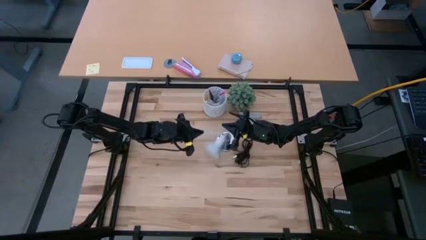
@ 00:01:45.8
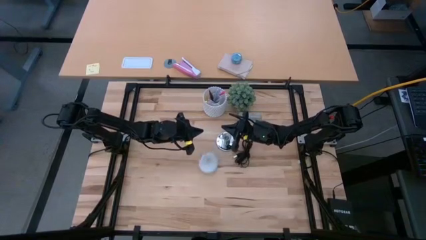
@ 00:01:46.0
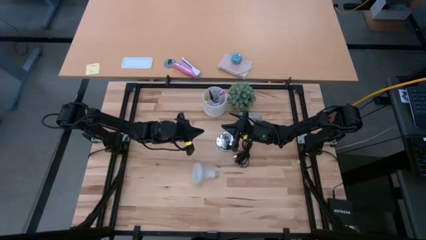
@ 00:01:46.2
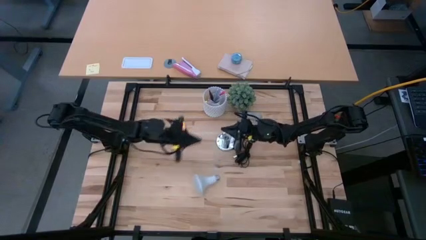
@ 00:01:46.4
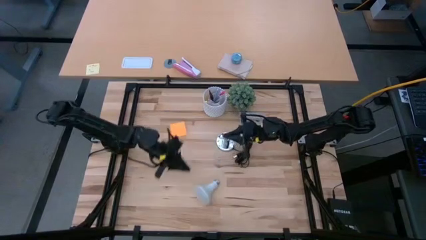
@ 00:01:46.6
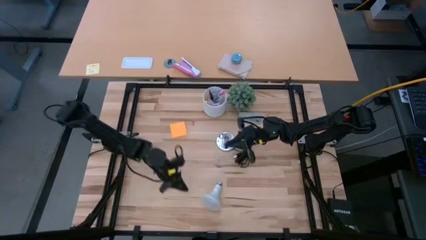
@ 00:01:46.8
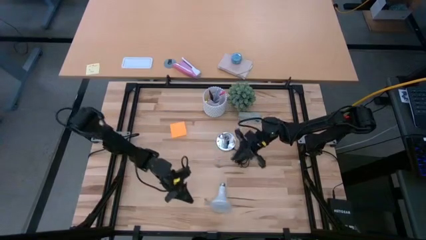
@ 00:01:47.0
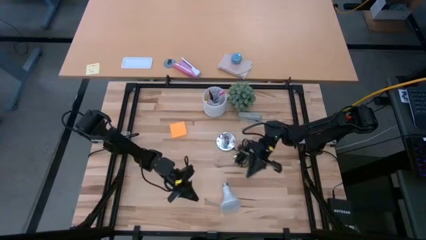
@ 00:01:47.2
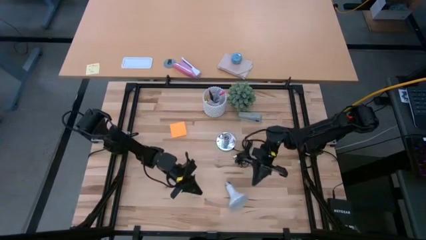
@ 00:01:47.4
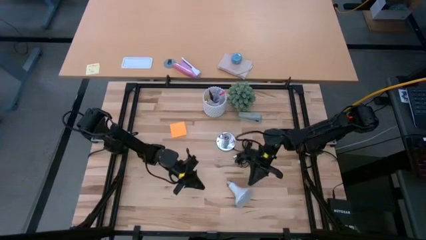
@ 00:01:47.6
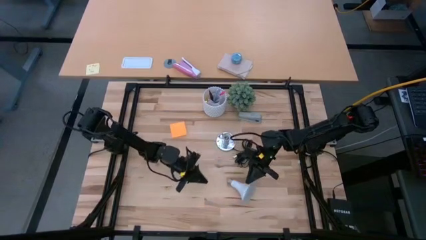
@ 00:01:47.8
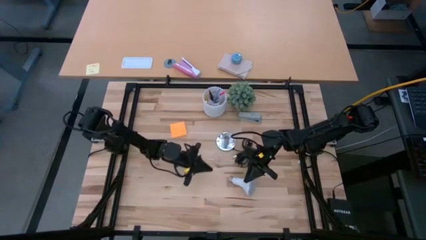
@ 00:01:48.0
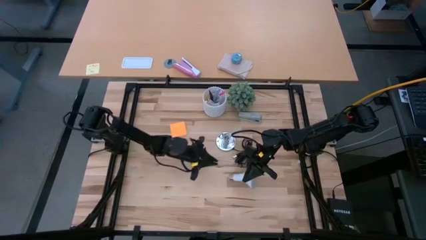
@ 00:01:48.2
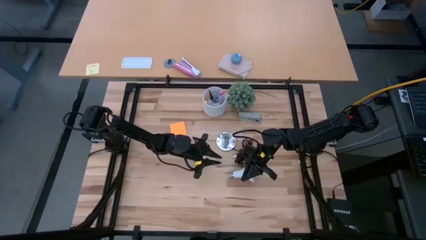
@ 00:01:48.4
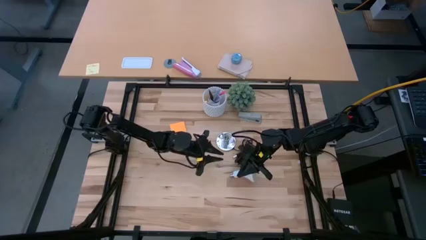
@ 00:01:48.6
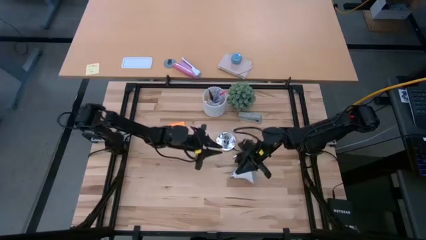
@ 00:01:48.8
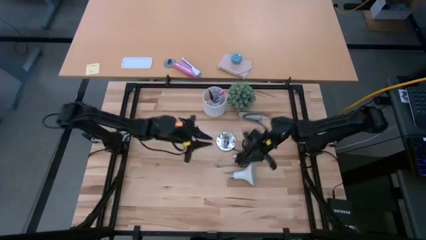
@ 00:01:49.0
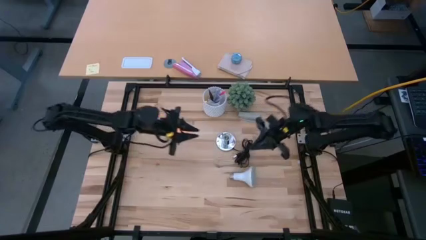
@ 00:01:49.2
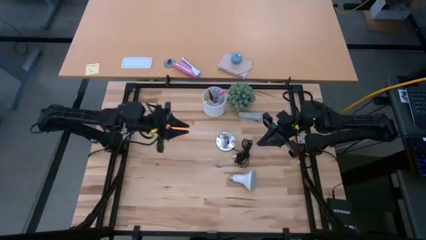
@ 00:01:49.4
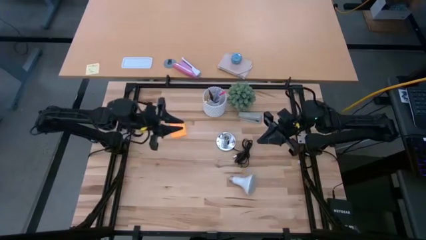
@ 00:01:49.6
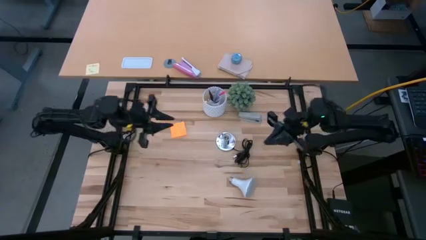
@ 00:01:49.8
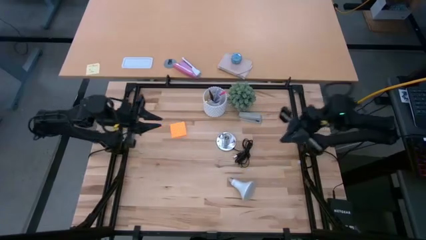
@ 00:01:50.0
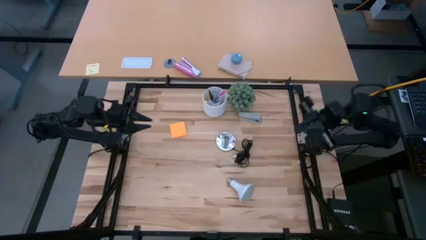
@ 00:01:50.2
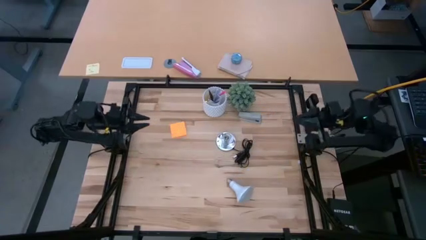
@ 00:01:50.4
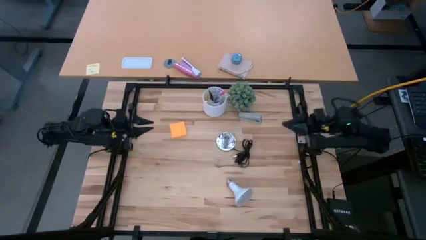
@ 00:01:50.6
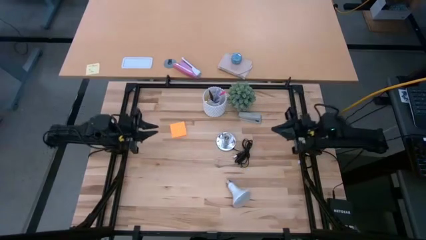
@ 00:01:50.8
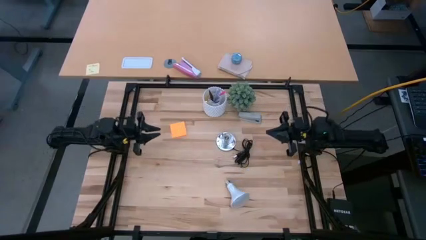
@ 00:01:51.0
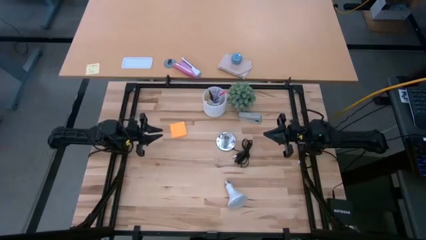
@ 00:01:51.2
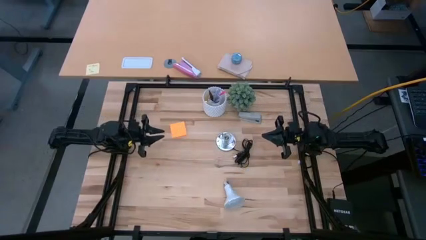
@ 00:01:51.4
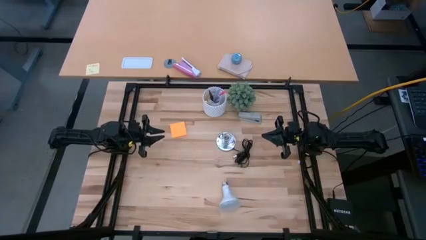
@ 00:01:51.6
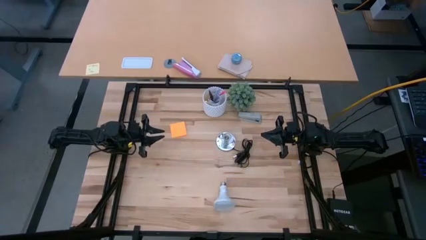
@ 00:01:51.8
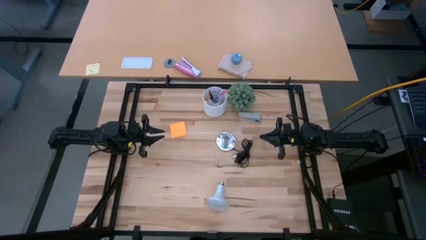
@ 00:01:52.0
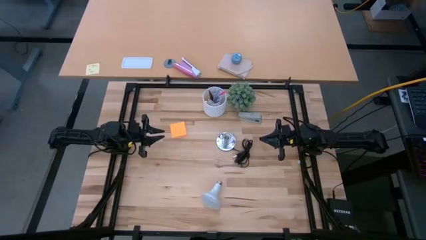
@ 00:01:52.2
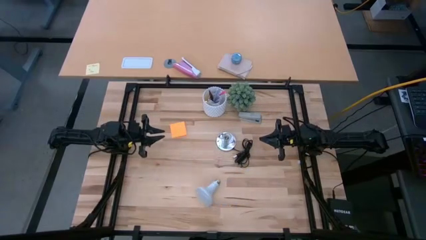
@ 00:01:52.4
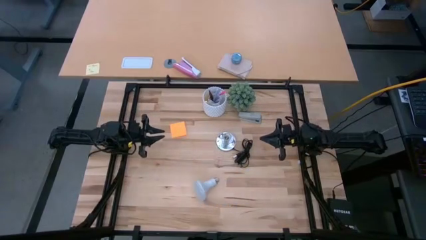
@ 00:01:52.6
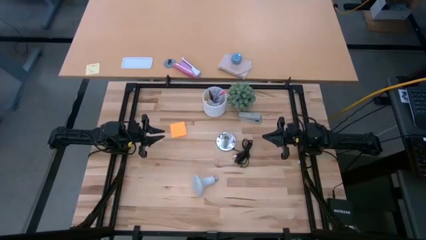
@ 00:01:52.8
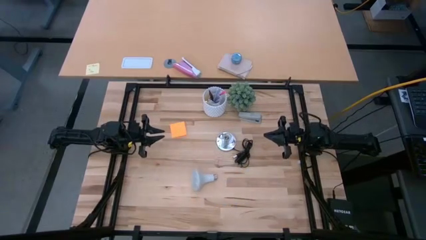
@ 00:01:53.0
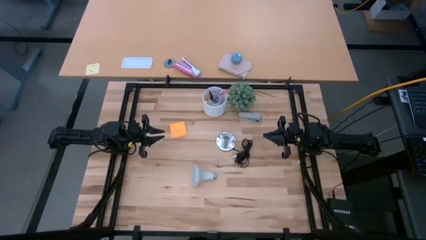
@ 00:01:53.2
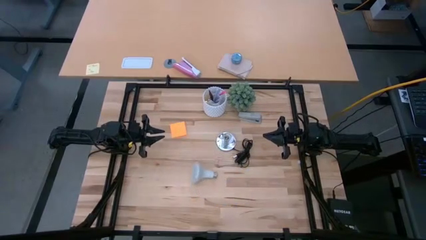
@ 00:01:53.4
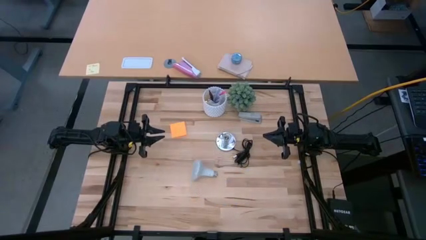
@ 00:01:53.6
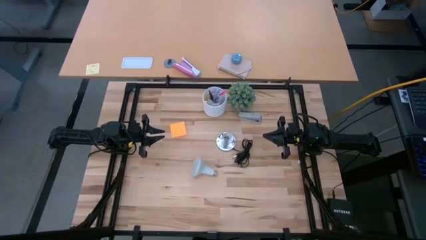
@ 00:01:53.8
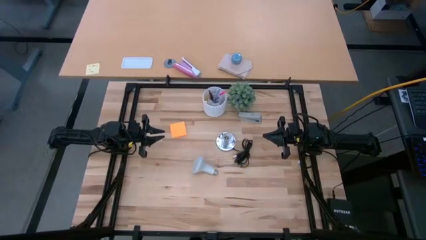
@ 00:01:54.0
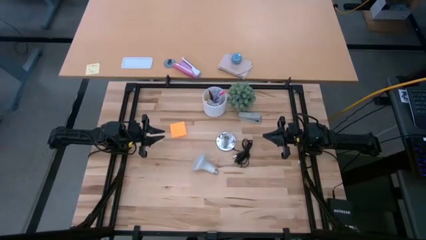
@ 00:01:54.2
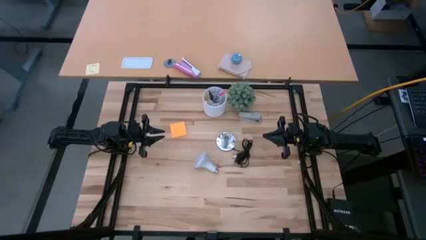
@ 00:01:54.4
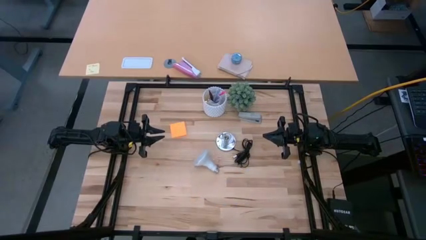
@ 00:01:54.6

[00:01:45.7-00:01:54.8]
Task: Screw lightbulb
Return to Home Position

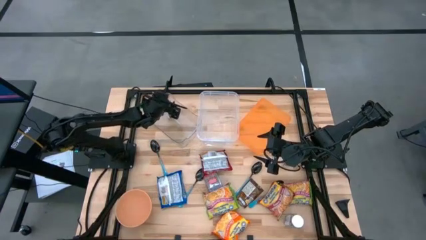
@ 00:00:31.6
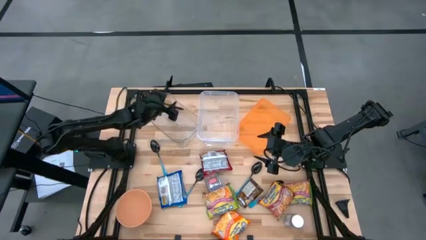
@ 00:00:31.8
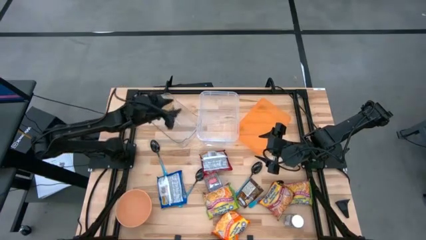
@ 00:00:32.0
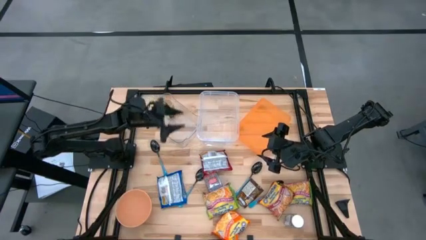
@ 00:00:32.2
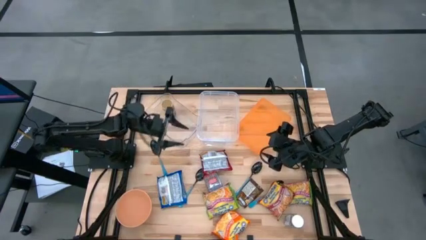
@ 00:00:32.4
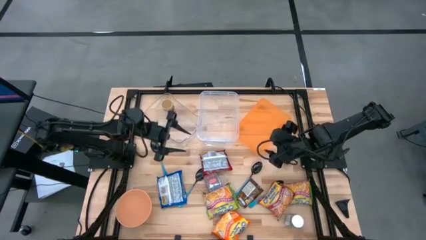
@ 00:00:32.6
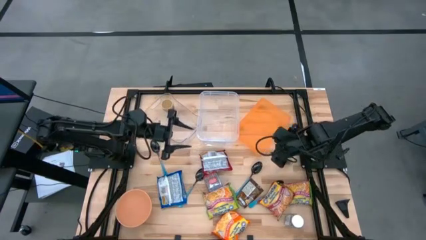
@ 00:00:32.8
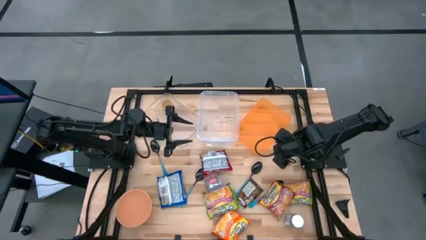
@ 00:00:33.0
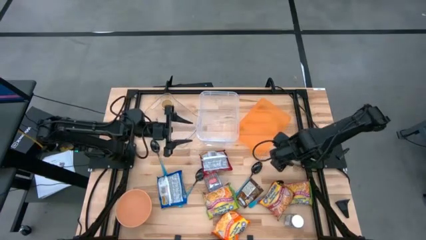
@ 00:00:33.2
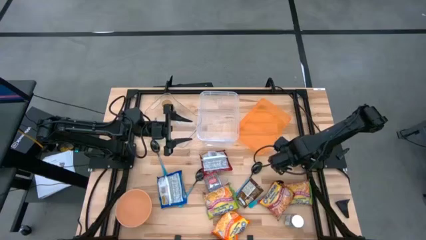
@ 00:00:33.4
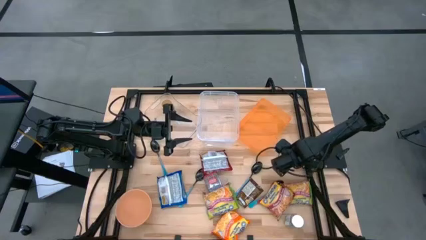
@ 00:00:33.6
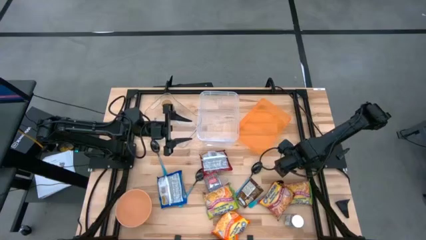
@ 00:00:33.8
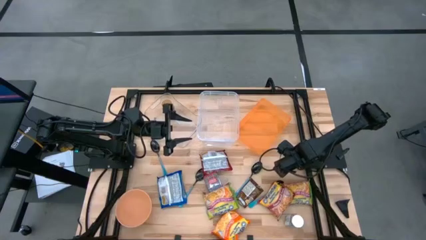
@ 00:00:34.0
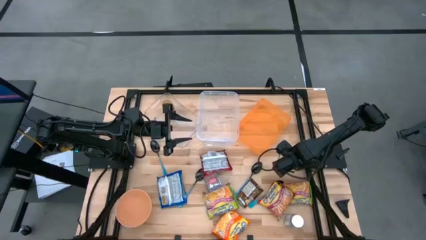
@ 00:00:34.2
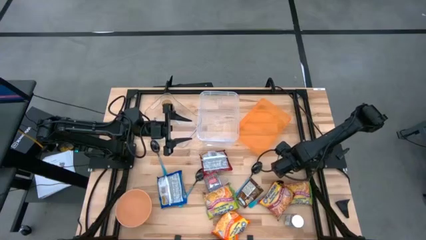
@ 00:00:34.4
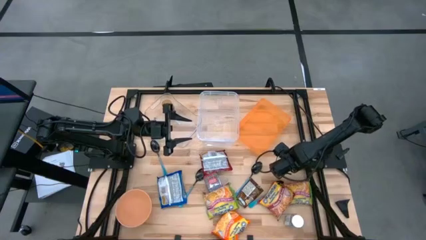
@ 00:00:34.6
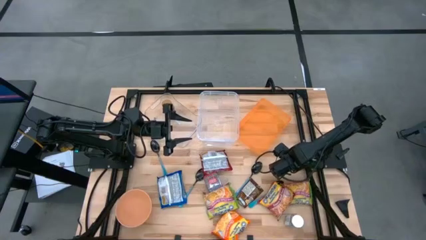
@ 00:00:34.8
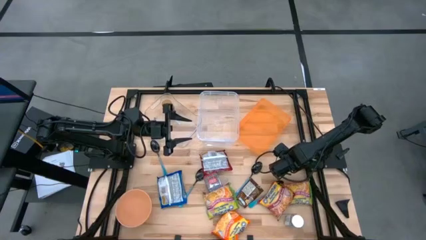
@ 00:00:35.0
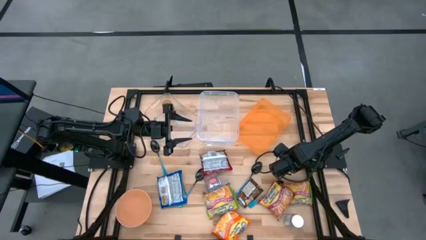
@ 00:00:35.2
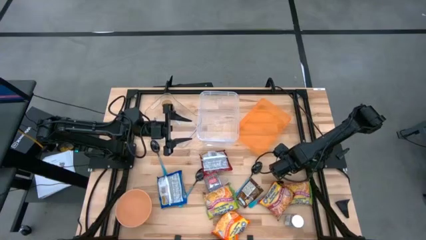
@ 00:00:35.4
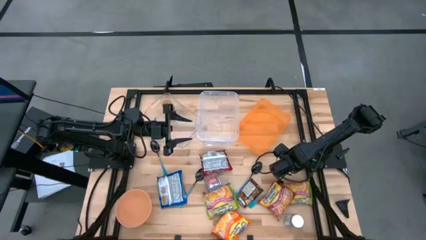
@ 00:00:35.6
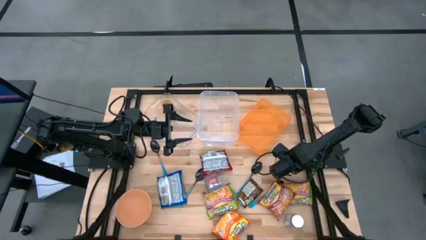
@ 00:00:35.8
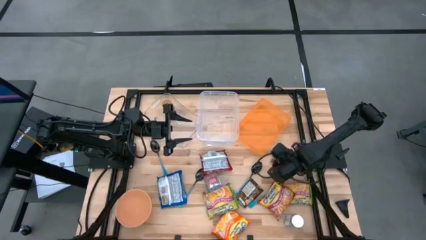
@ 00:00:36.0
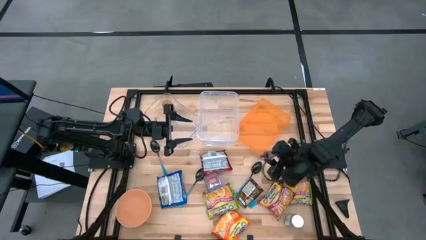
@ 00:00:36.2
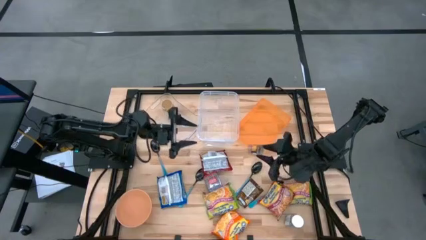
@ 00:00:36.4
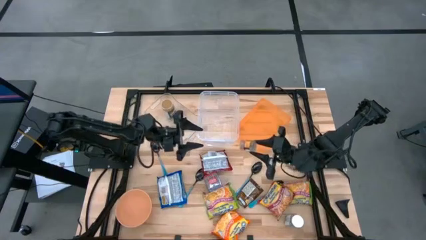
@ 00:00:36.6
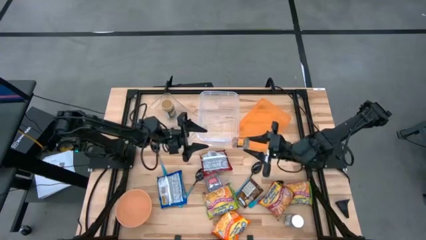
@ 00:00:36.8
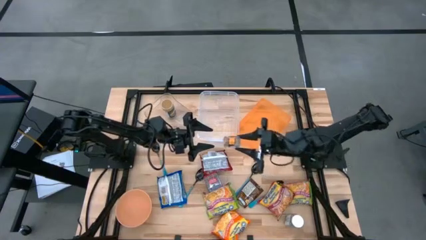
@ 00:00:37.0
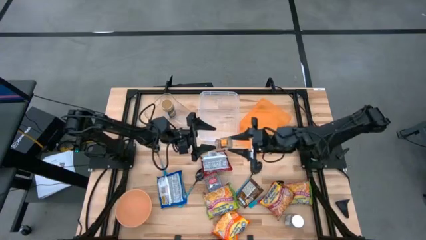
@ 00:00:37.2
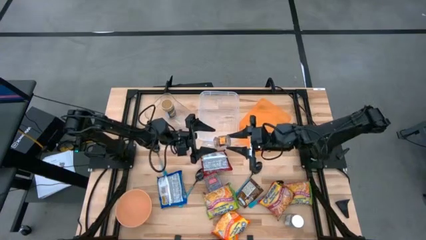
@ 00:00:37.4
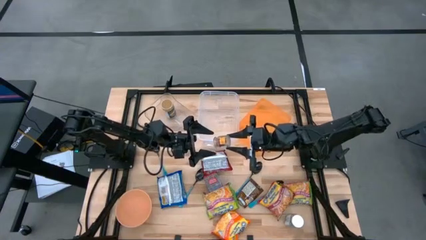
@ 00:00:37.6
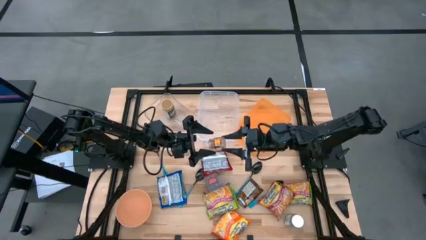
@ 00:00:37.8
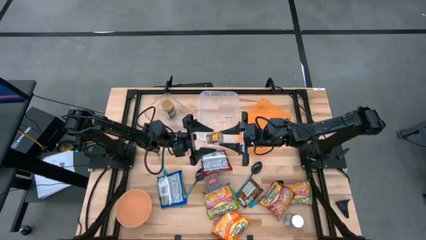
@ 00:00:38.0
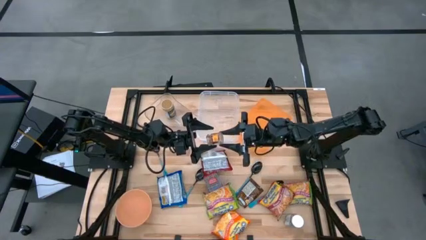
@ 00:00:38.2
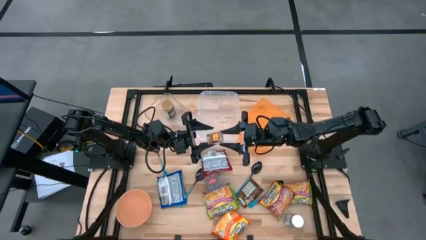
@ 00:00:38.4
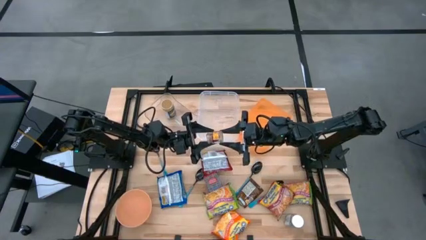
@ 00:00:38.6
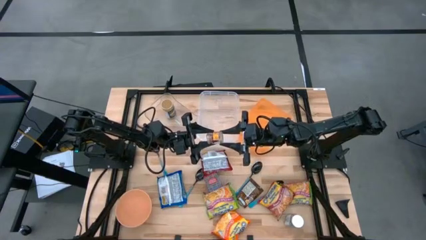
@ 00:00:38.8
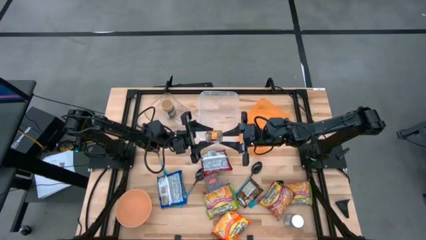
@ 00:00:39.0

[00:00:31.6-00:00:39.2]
Task: Pick & Place Food Item
Put the brown seasoning bottle into the transparent bin
